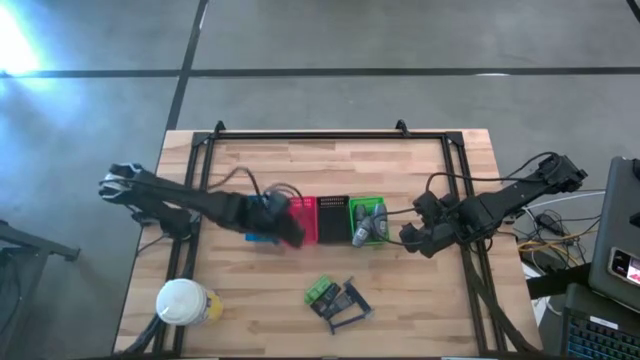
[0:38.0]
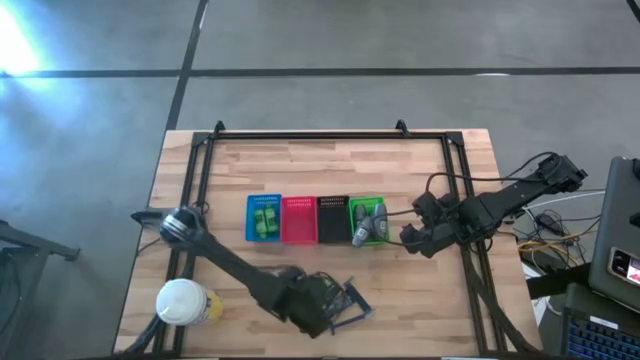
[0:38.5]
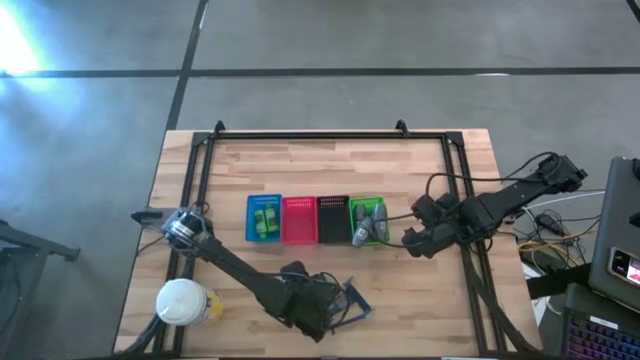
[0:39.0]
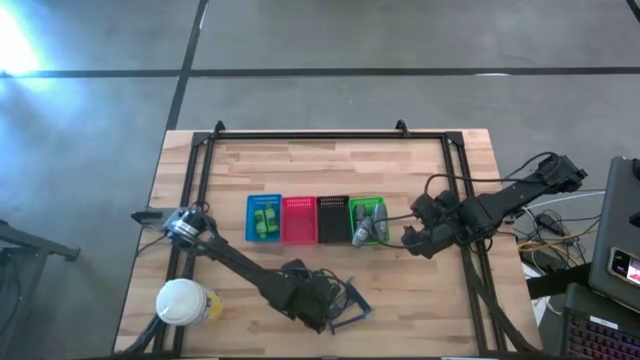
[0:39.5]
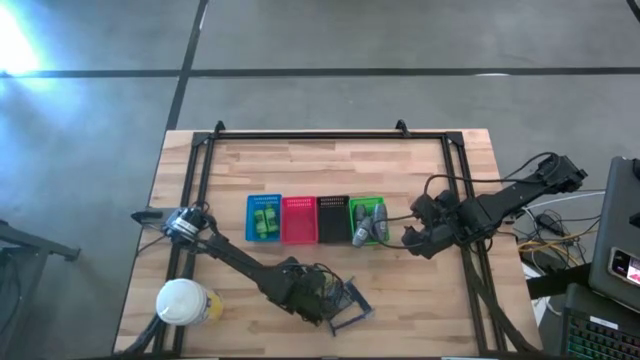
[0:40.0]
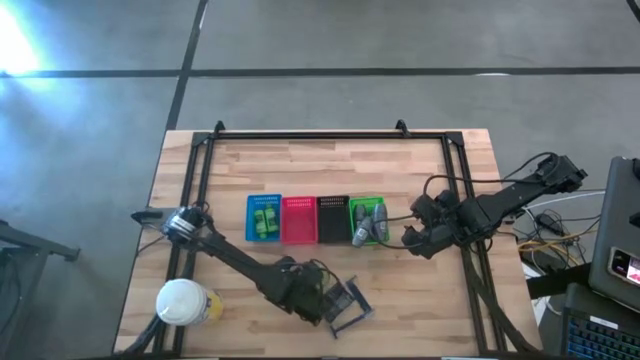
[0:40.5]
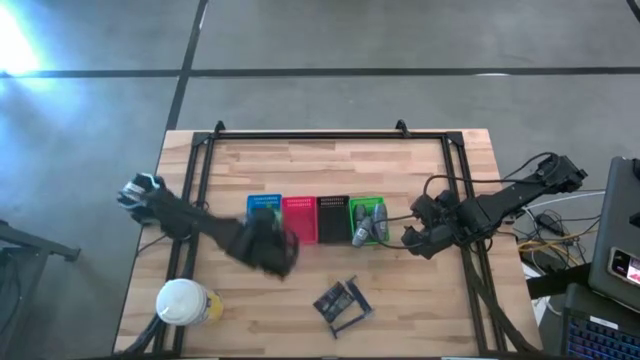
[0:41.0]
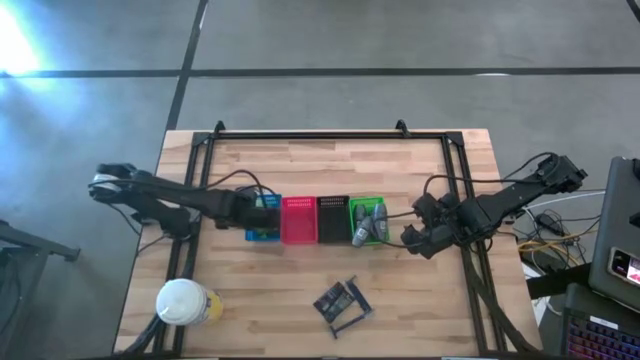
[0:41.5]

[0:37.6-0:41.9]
Task: Pick & Place Travel size toiletries
Put the shampoo into the blue bin

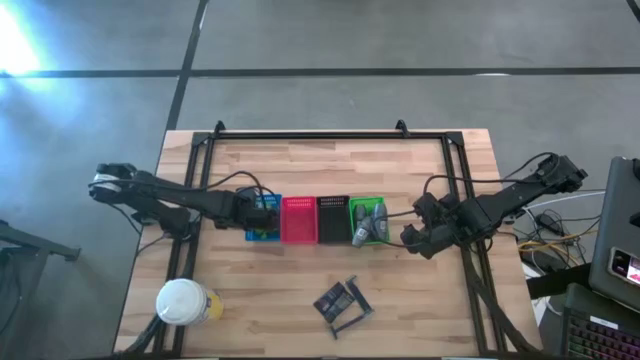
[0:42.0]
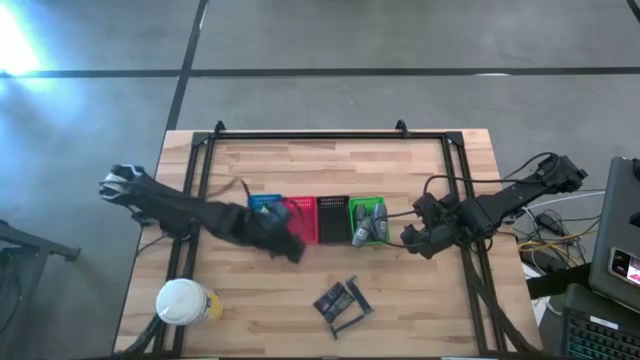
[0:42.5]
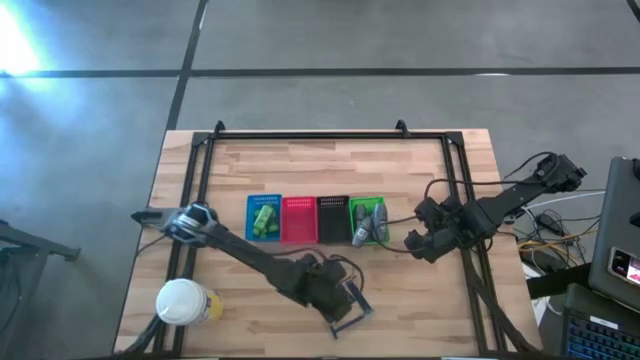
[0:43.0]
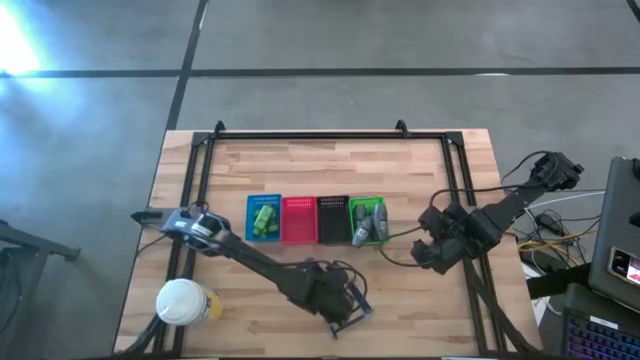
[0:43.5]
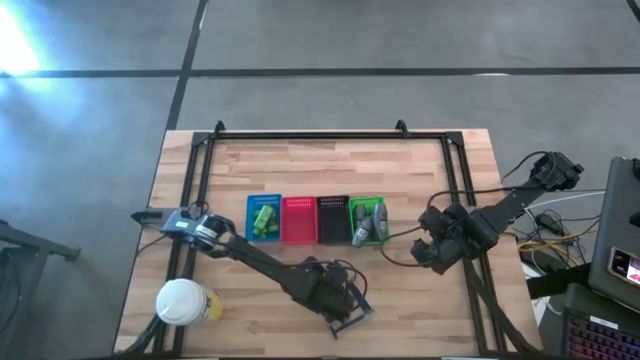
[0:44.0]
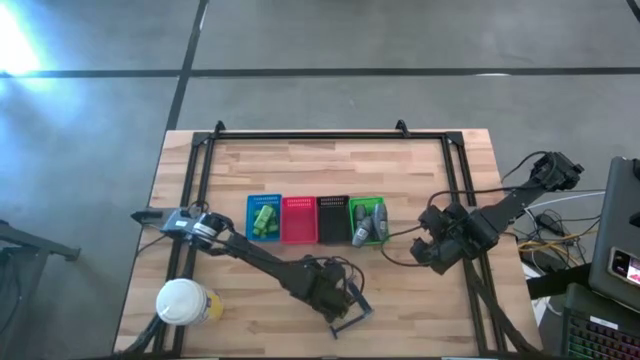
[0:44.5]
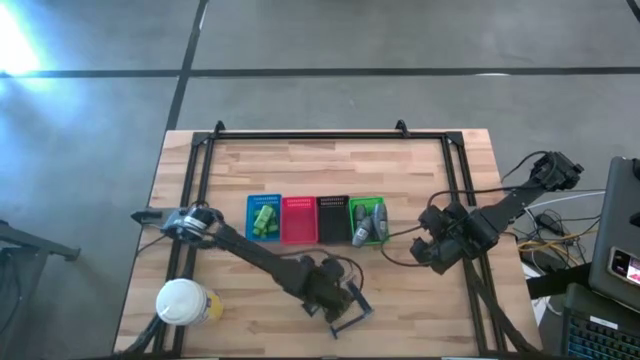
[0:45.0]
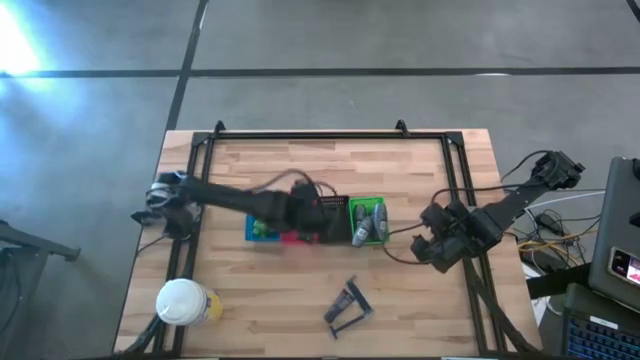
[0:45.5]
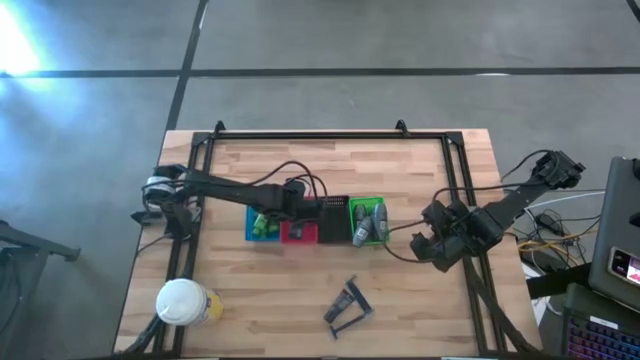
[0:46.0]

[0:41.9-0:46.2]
Put the left shave cream into the red bin

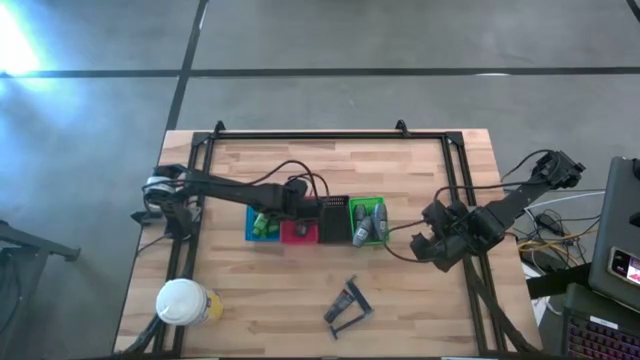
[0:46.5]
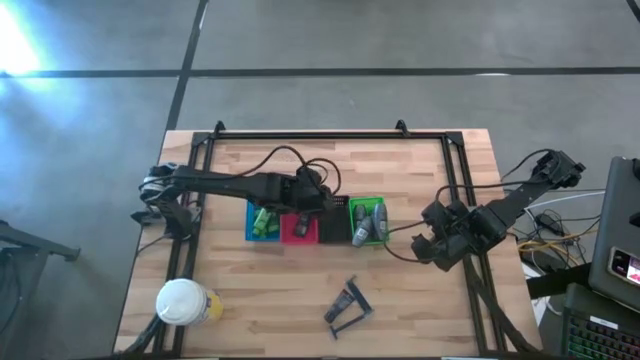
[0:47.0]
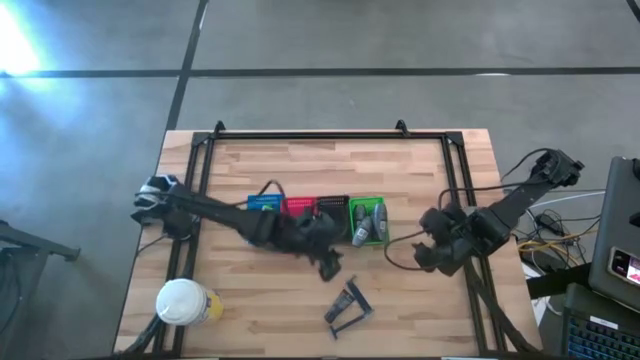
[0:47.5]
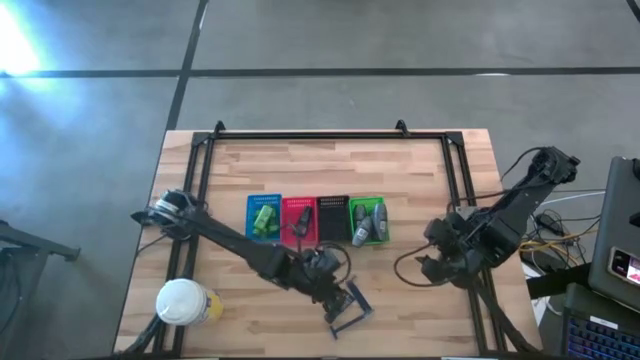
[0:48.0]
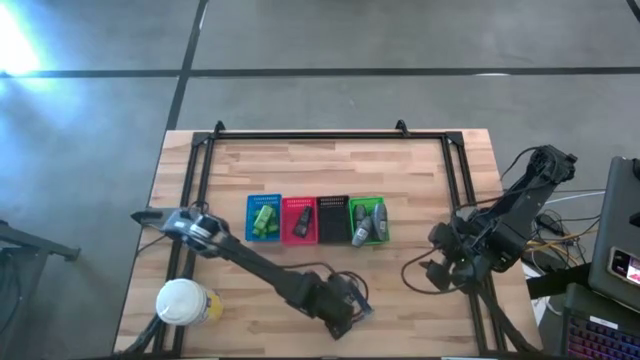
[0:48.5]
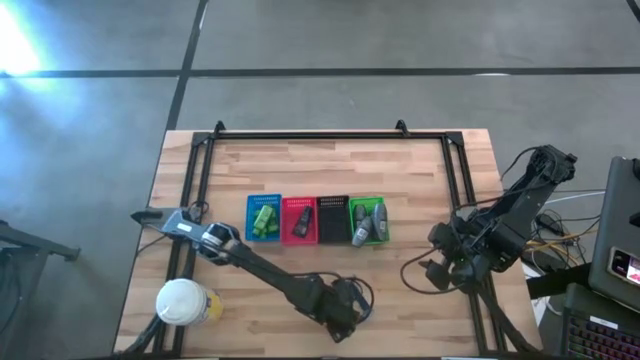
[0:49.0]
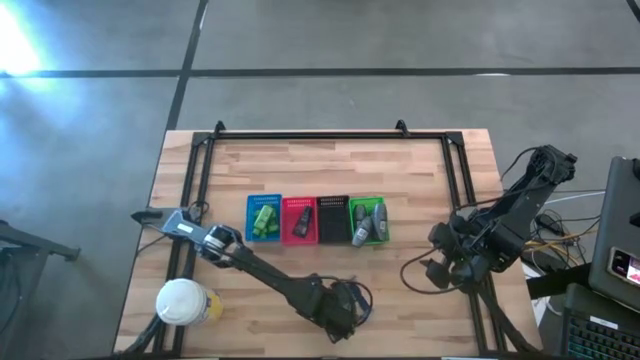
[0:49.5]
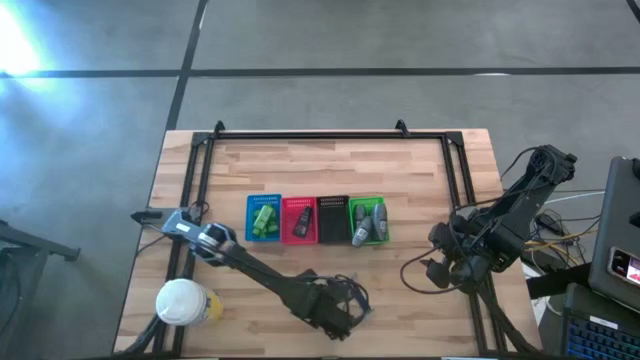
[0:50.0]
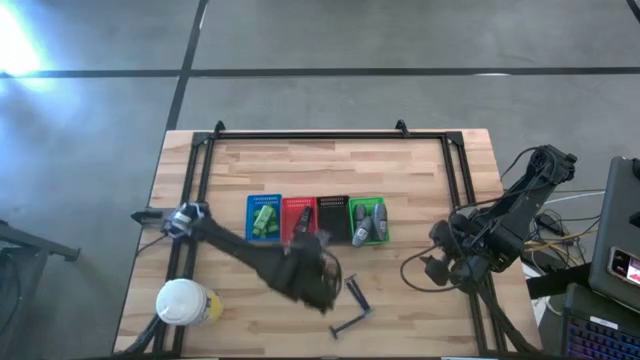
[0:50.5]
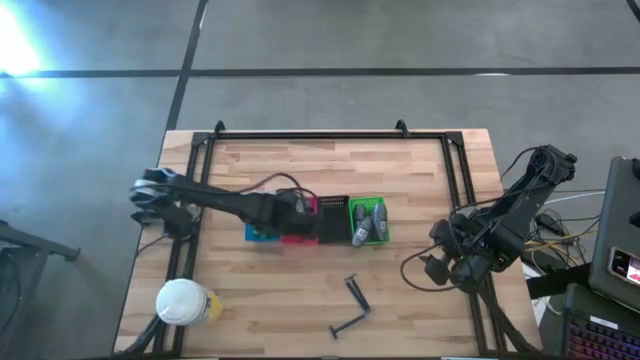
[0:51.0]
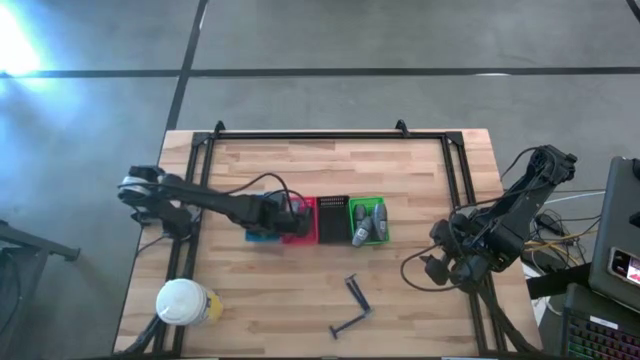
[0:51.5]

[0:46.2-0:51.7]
Put the shave cream into the red bin

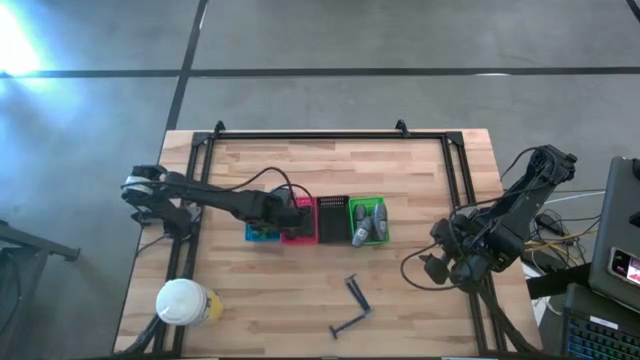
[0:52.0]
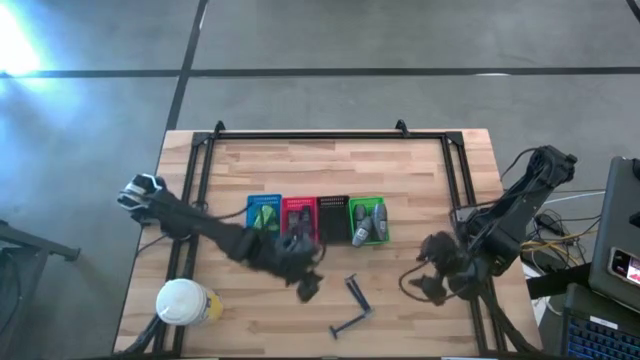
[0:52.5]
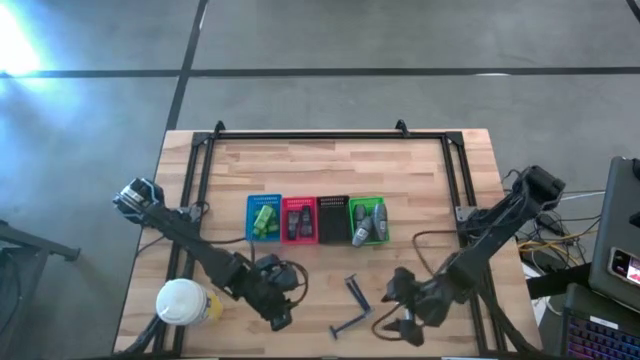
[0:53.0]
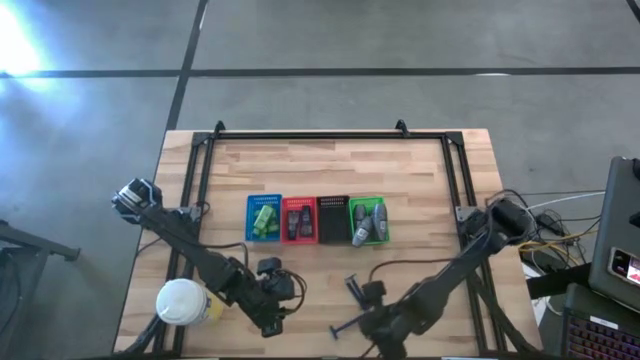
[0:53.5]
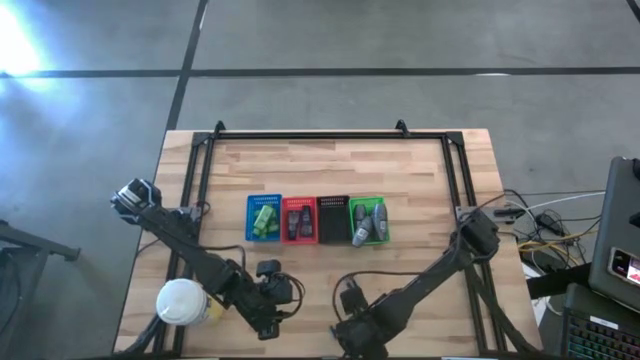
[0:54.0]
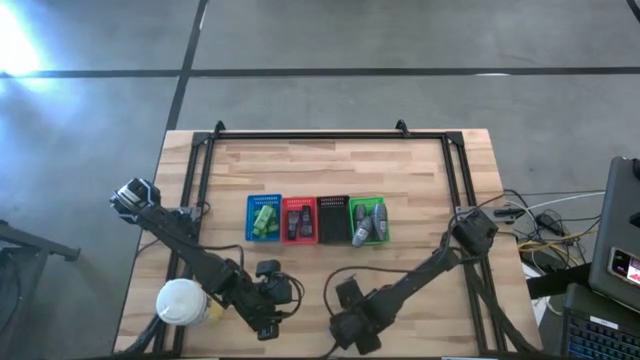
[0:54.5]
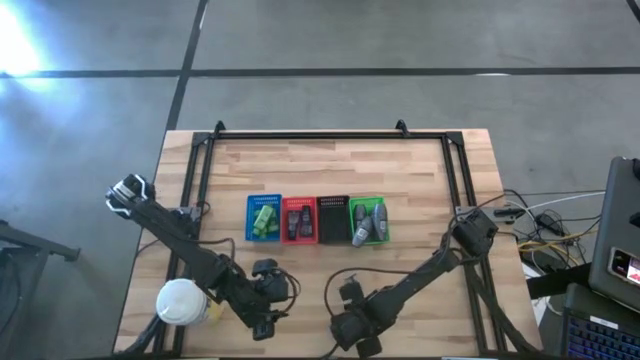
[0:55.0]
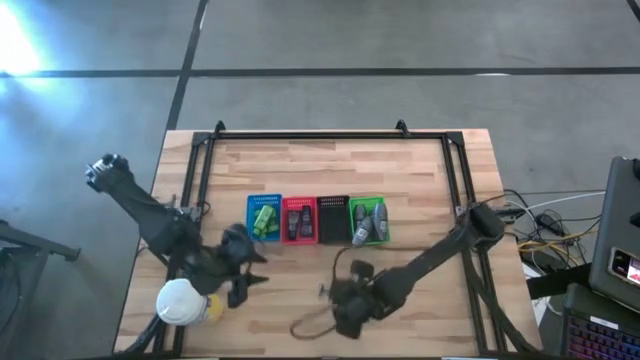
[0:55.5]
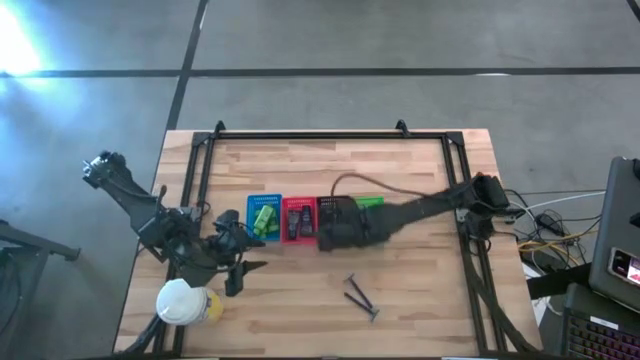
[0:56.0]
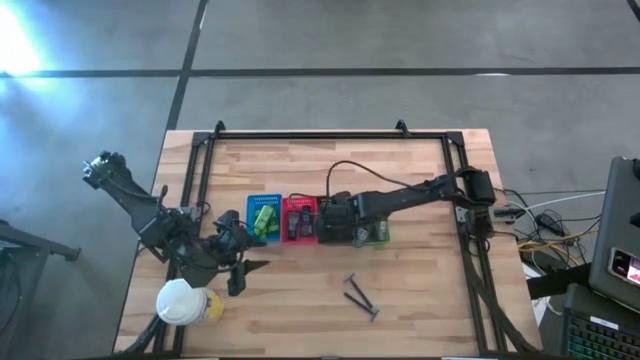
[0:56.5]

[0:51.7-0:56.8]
Put the bottom shaver into the black bin

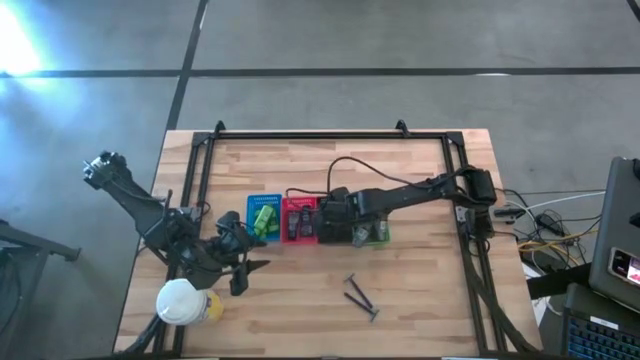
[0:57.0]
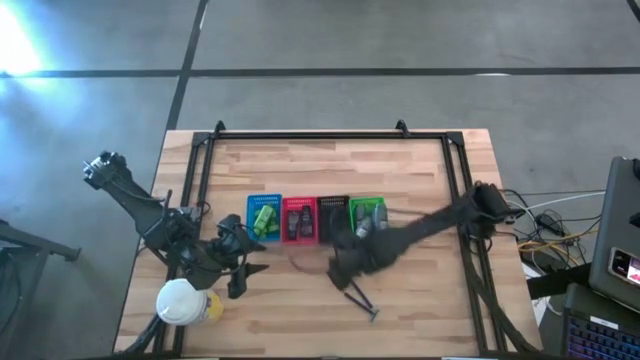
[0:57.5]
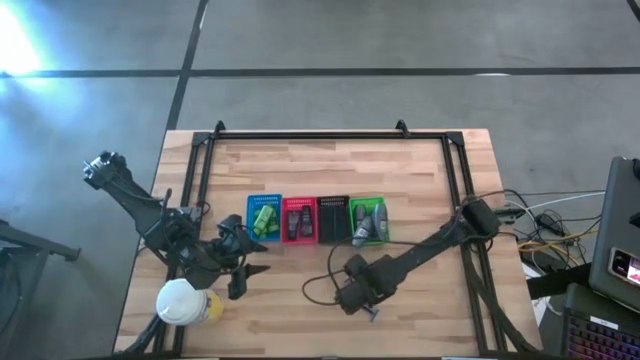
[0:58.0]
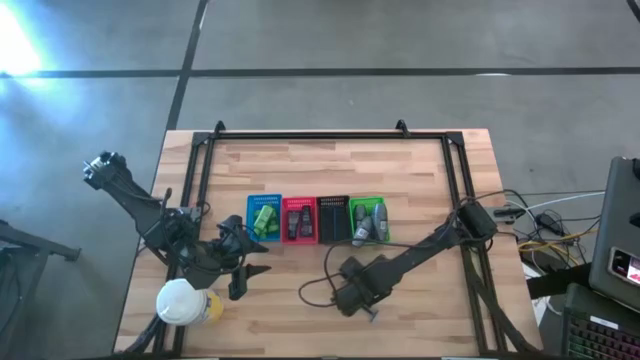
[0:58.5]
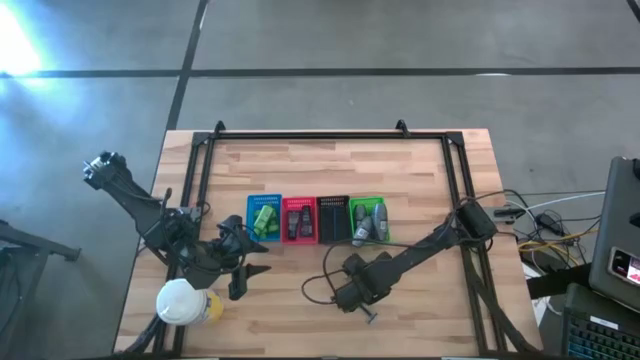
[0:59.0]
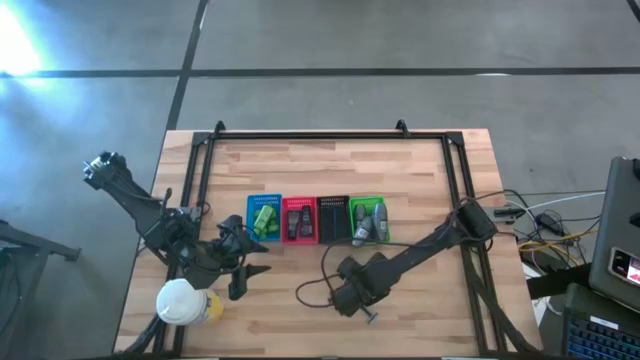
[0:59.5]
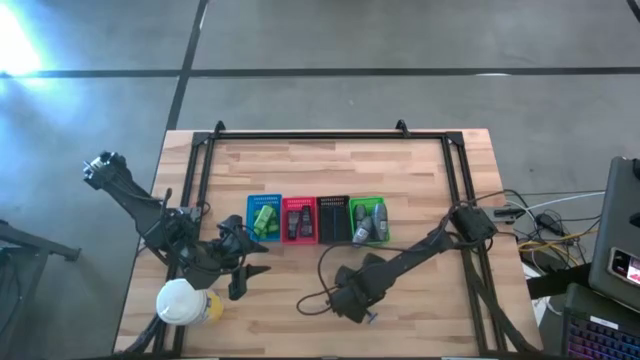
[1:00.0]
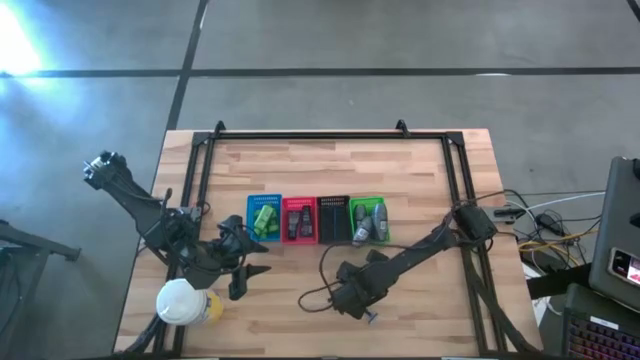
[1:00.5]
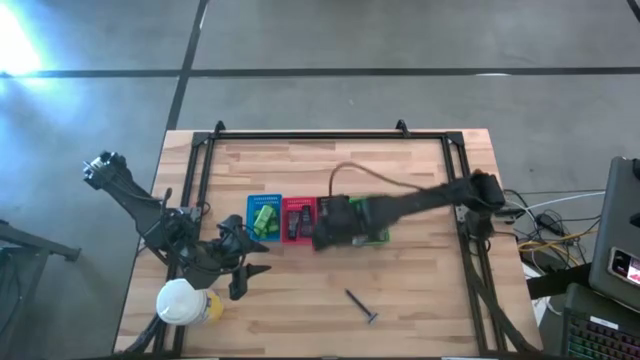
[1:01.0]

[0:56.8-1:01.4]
Put the top shaver into the black bin
